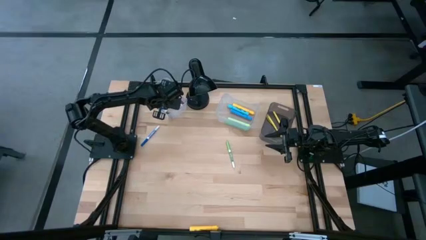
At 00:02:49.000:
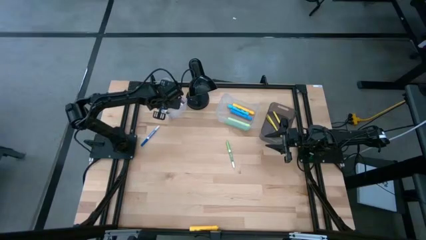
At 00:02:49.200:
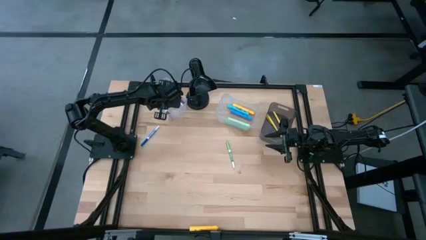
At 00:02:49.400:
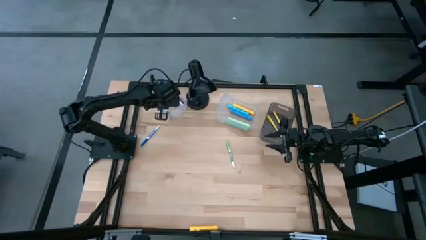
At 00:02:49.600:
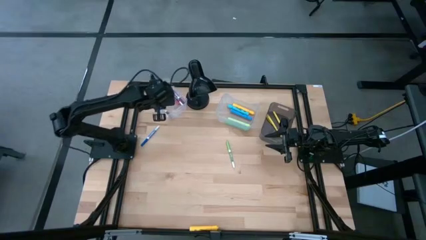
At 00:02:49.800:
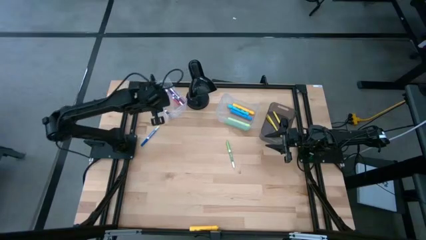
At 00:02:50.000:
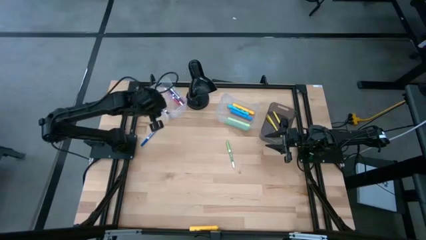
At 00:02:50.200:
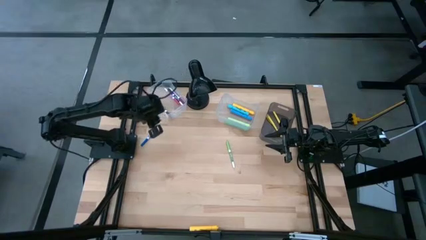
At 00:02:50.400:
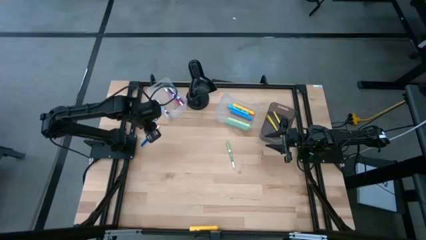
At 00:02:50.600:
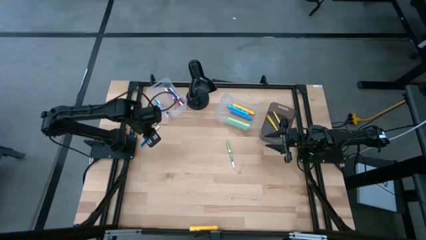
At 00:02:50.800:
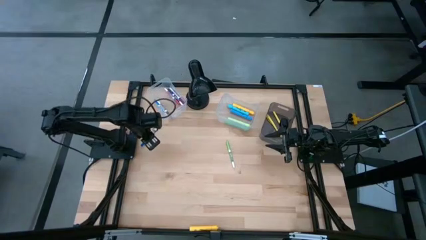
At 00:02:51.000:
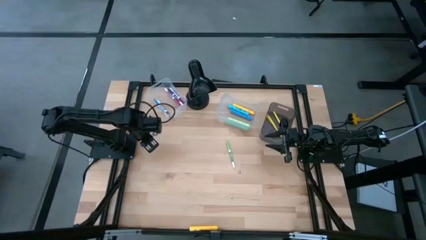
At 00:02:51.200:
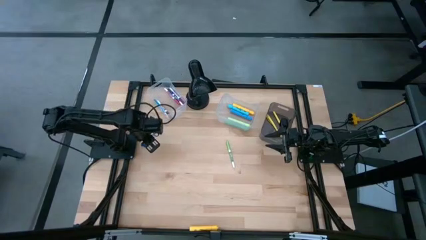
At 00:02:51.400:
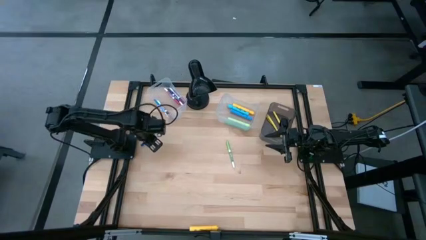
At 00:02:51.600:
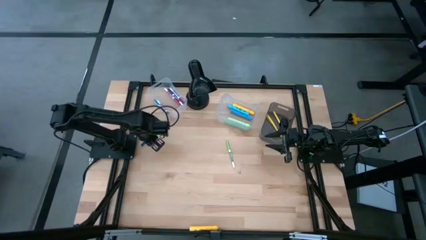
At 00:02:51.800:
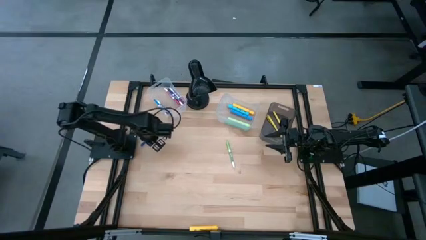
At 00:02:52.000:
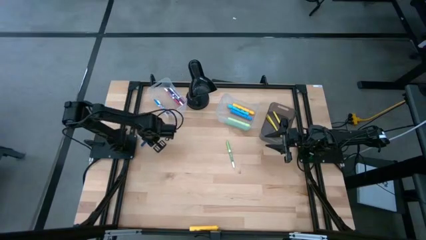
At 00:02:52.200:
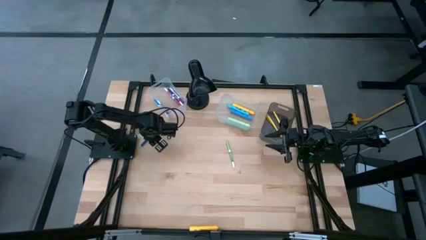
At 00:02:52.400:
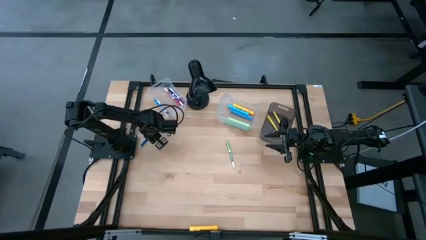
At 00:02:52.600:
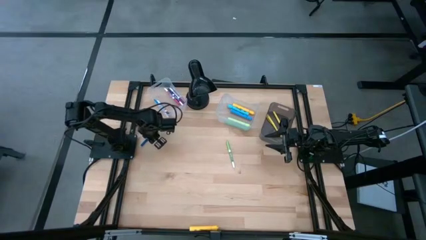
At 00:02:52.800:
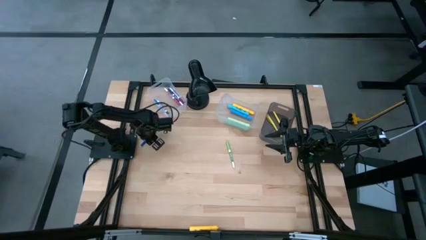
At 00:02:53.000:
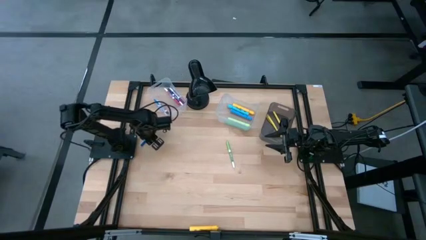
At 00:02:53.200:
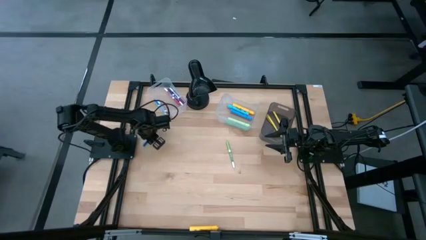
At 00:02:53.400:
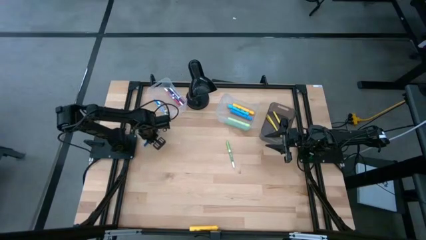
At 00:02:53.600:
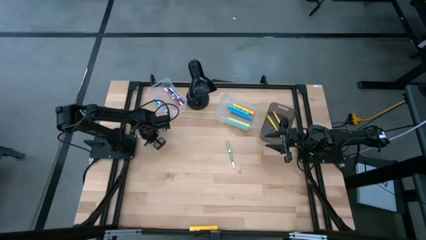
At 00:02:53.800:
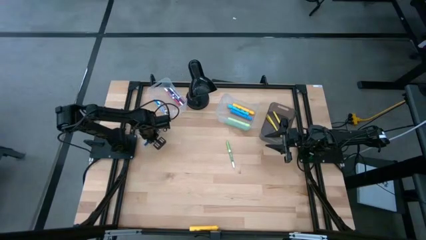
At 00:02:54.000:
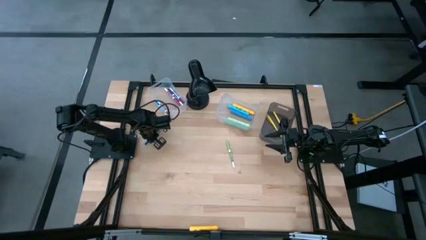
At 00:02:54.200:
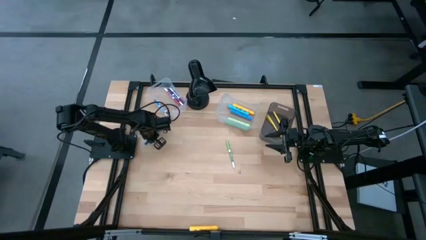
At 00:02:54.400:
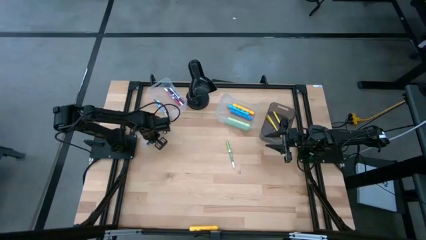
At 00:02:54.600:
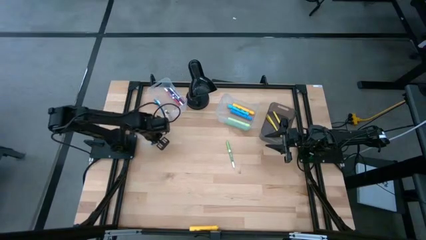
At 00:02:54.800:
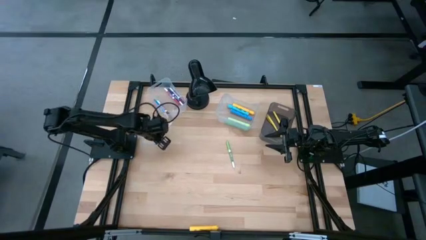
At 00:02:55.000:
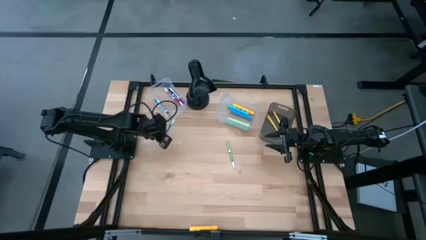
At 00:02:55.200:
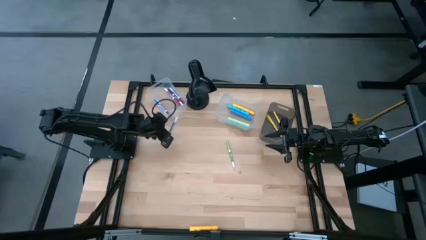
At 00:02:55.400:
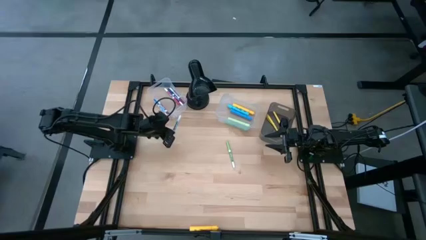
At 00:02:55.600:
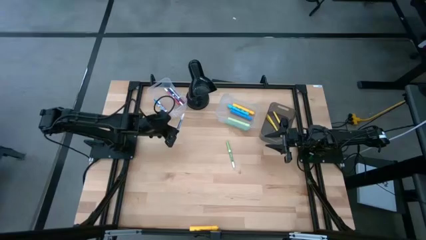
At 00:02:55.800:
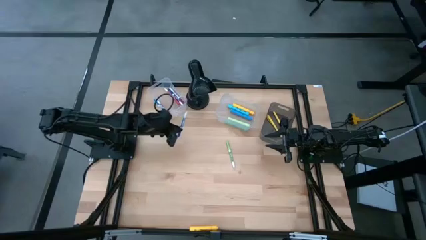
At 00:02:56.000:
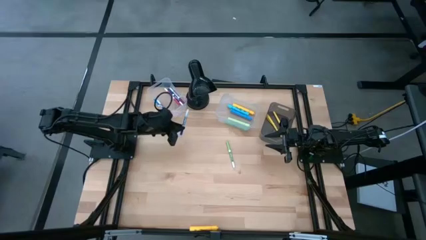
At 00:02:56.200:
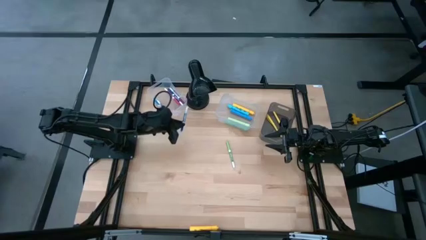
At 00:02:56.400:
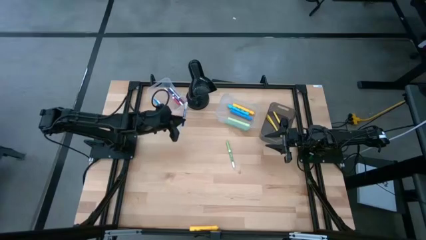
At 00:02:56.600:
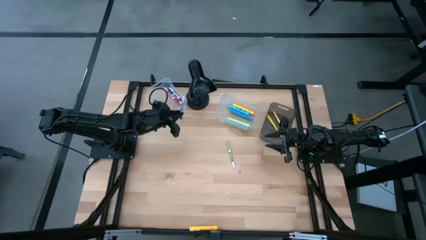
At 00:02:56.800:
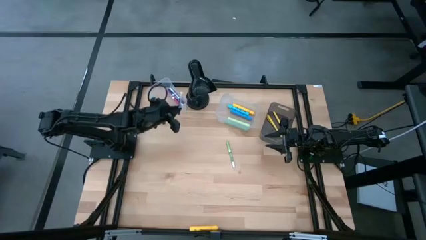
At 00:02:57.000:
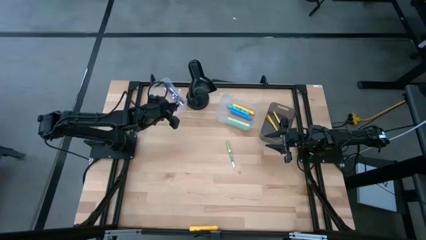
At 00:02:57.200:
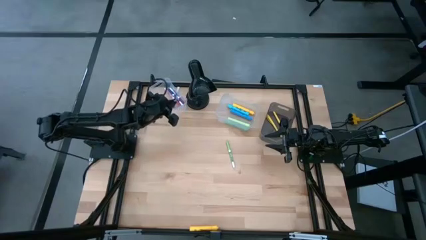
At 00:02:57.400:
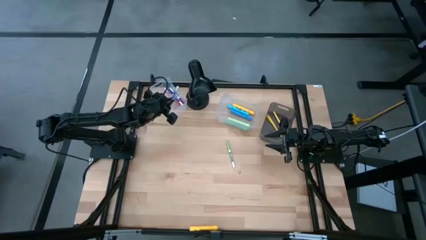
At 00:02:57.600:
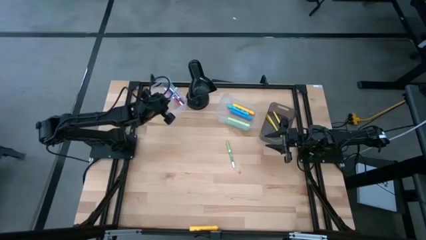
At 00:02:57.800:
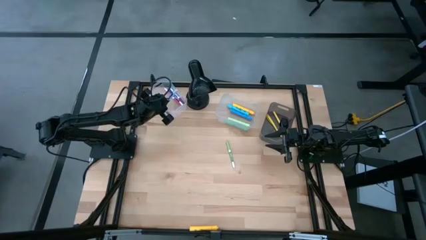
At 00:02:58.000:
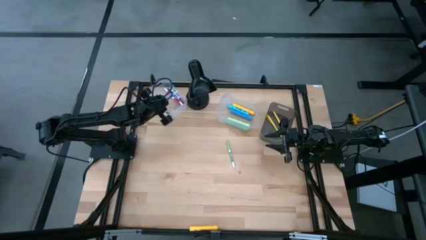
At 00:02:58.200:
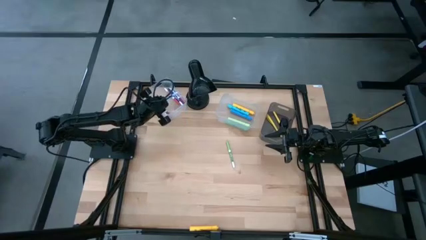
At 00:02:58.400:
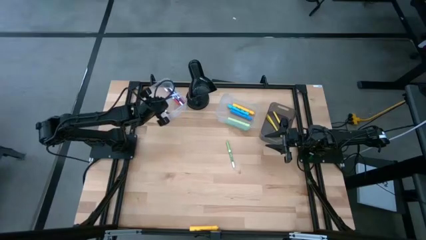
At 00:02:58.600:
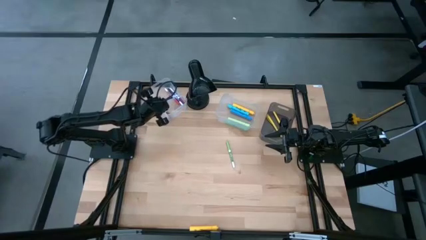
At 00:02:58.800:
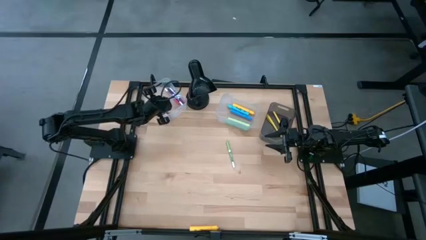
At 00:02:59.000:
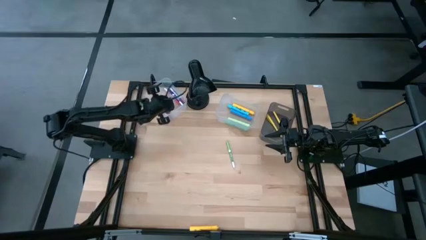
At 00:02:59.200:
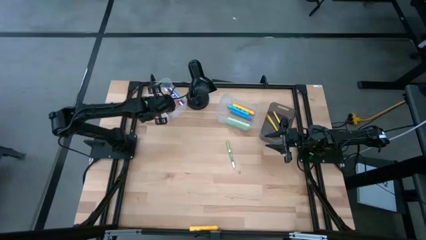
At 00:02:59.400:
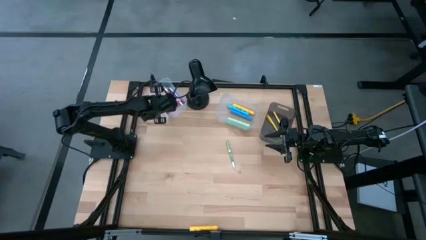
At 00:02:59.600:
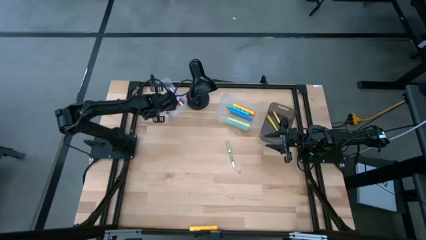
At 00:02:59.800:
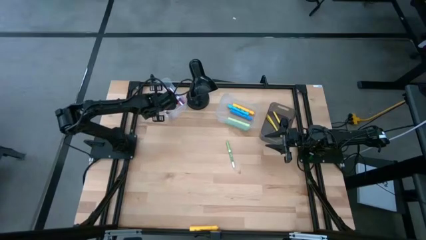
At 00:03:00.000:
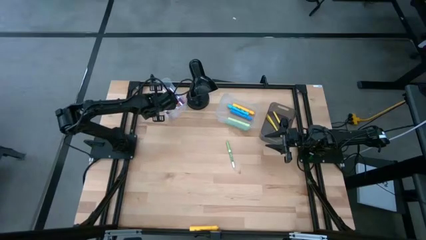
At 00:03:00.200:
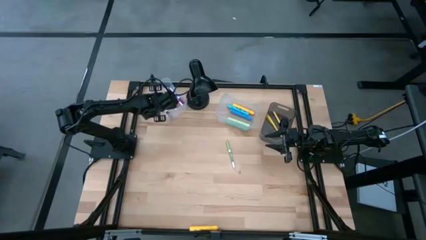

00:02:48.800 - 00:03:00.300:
Task: Pick & Place Markers
Put the blue marker in the left transparent bin

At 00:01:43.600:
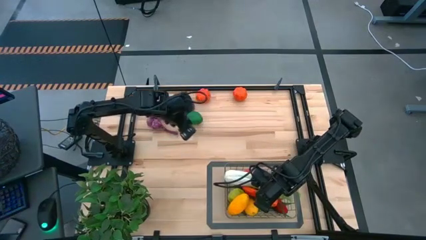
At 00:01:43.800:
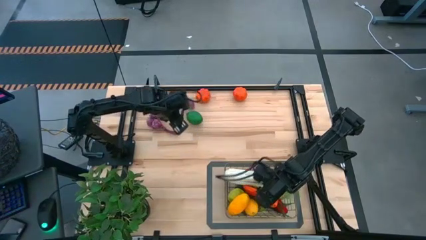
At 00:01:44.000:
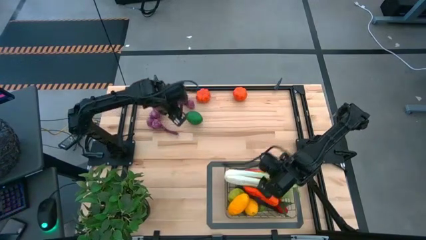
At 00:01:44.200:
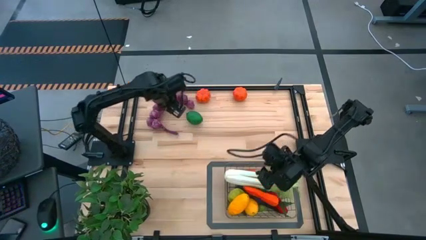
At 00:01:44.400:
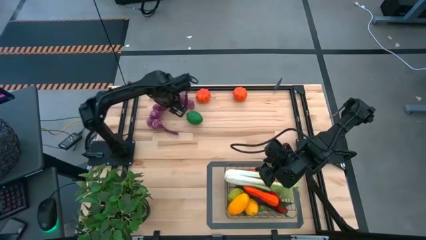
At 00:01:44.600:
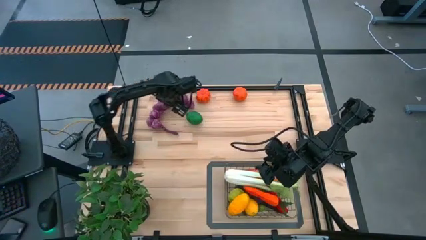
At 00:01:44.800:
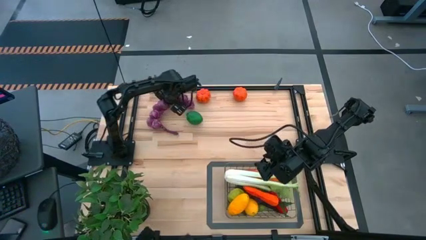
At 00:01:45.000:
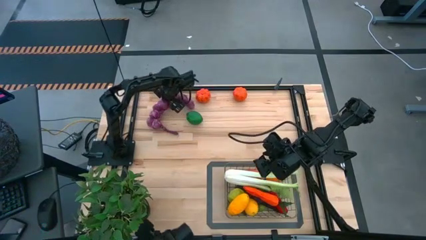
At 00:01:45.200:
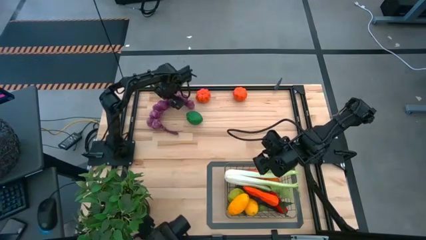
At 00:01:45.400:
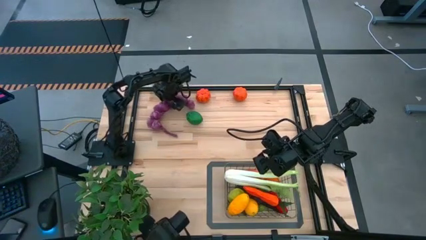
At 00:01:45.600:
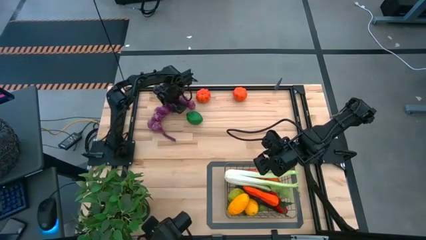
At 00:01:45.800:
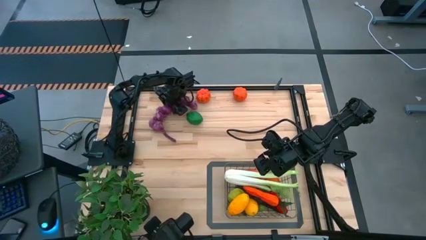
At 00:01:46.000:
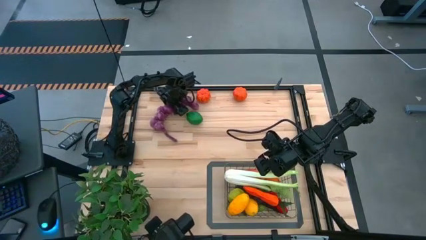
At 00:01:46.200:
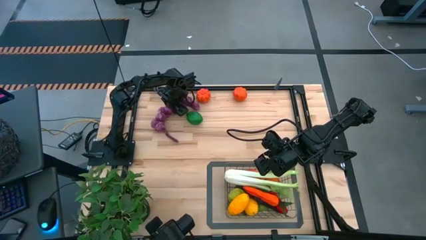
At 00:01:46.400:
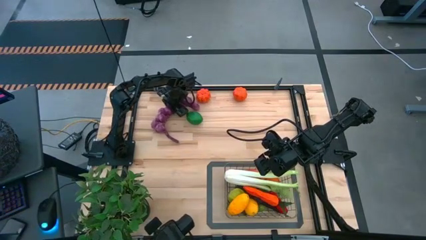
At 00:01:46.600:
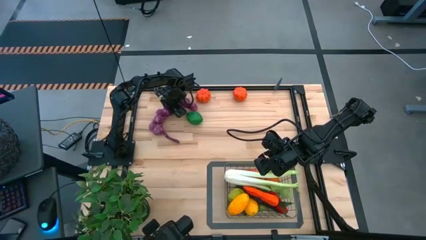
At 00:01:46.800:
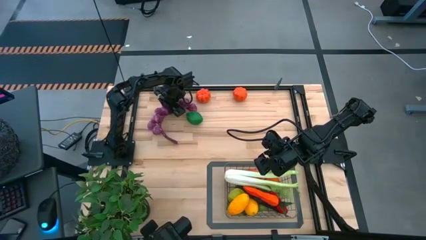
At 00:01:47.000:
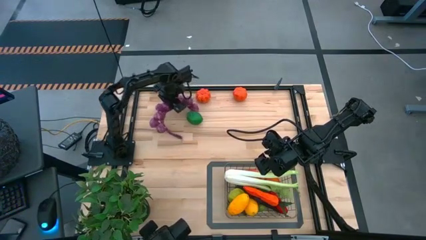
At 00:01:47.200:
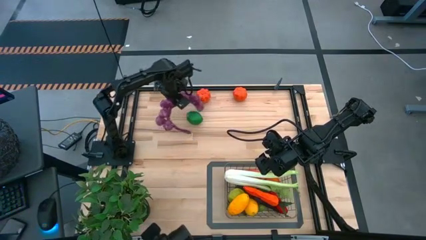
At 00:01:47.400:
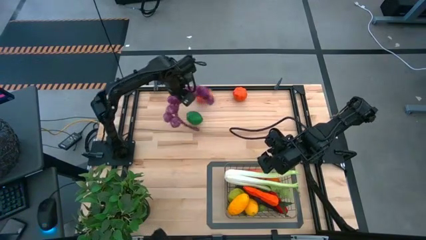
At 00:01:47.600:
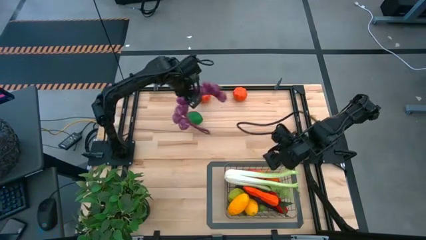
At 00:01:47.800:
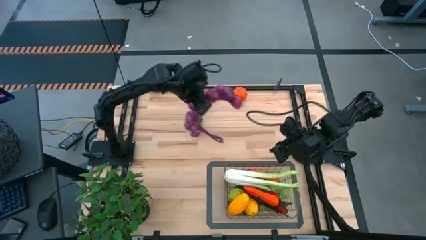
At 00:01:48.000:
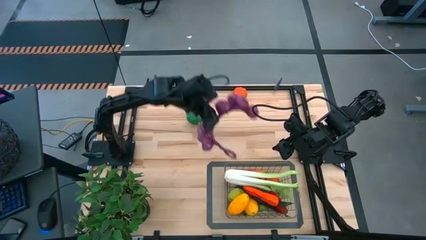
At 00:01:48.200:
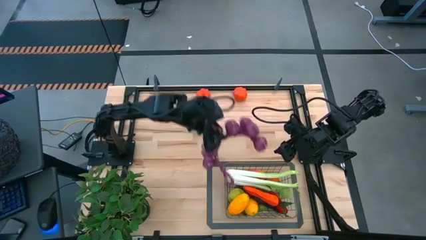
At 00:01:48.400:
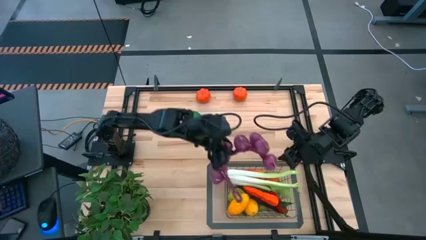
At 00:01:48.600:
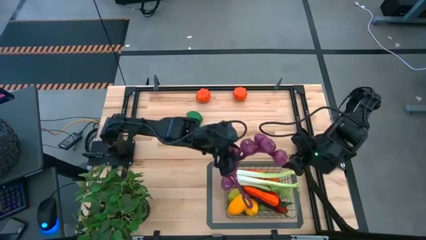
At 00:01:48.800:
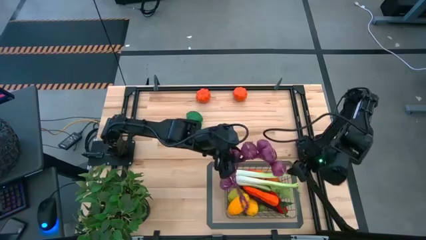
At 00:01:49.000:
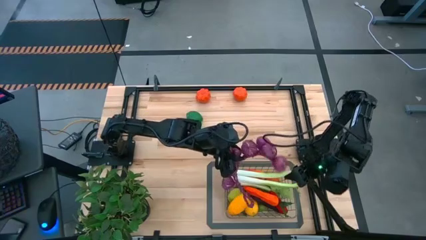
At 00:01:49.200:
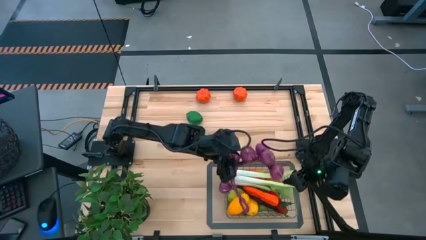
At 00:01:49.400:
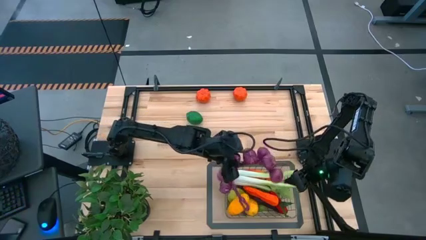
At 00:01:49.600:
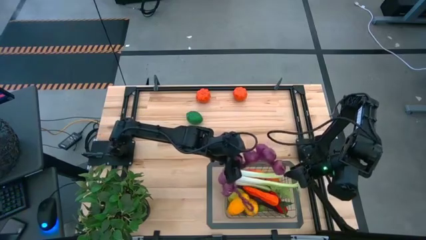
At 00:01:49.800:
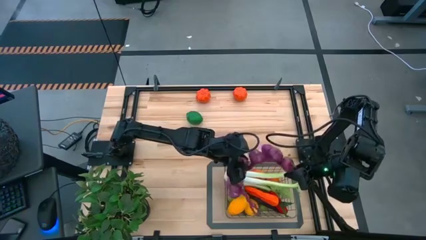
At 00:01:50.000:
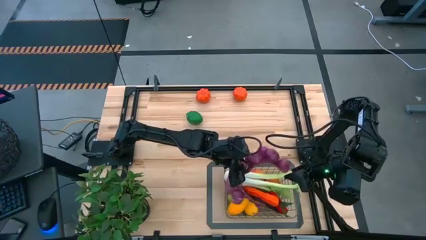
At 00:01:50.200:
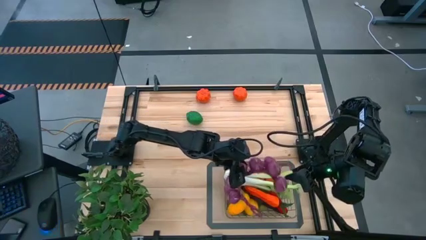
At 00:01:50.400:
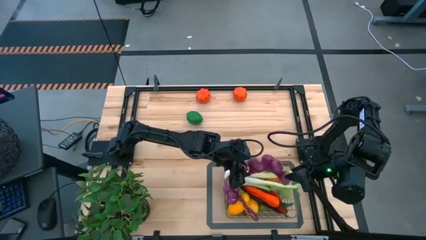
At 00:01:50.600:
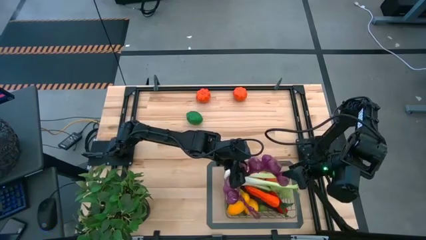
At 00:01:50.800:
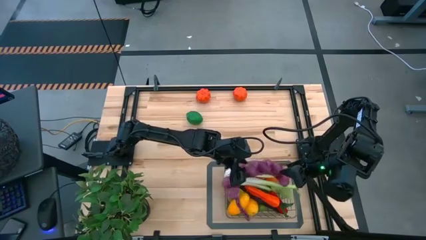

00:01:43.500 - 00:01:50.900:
Task: Build produce basket
Put the purple garlic into the wire basket
